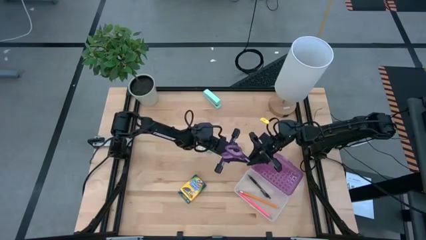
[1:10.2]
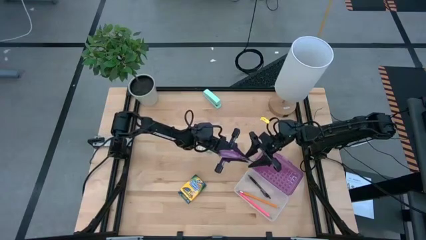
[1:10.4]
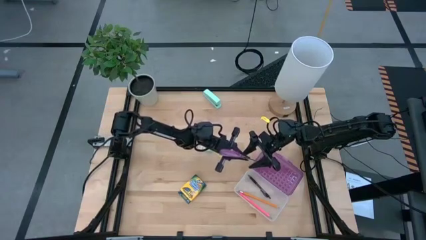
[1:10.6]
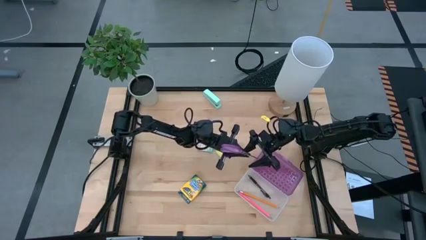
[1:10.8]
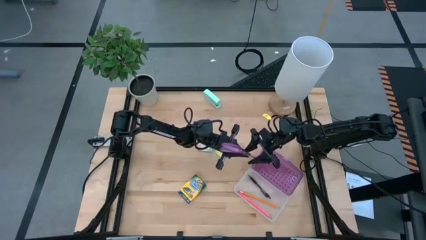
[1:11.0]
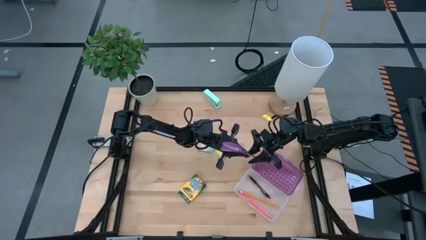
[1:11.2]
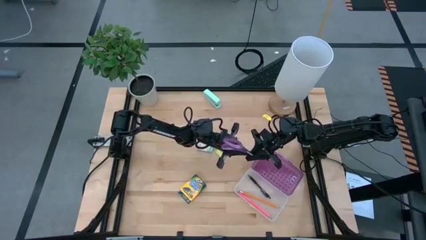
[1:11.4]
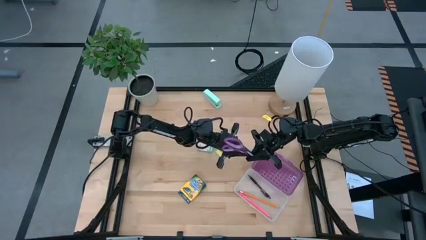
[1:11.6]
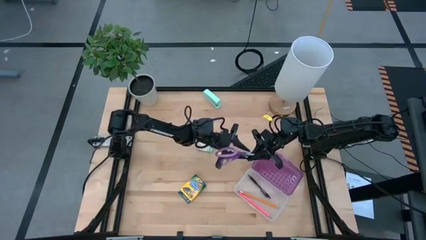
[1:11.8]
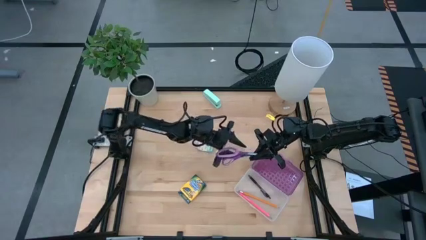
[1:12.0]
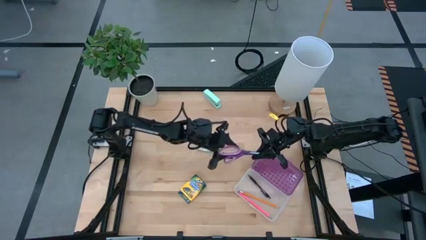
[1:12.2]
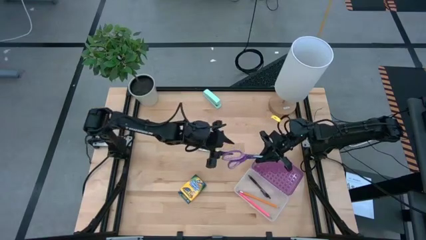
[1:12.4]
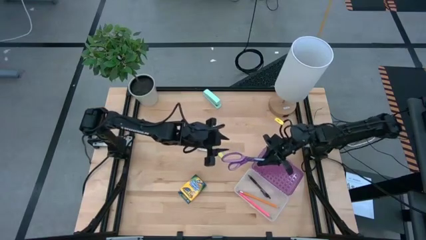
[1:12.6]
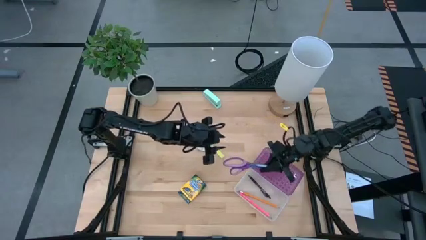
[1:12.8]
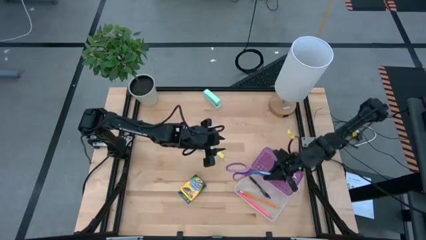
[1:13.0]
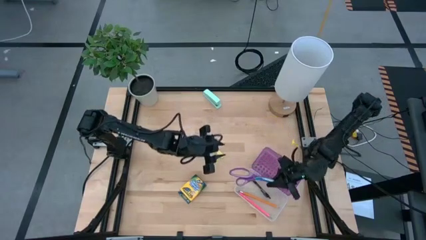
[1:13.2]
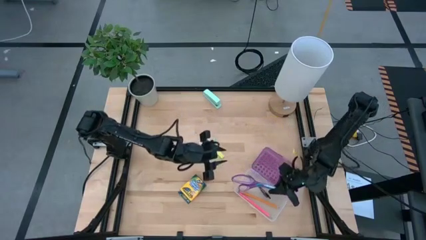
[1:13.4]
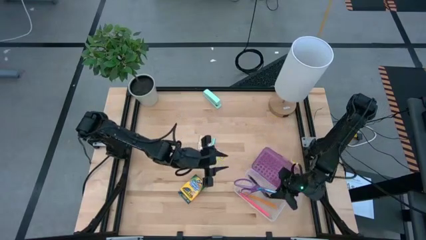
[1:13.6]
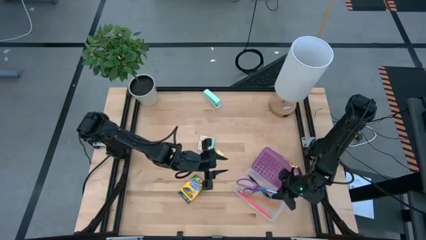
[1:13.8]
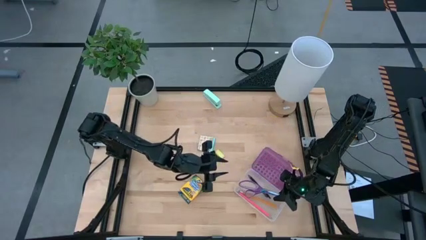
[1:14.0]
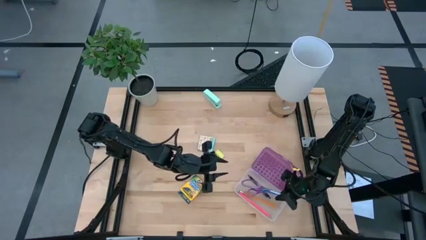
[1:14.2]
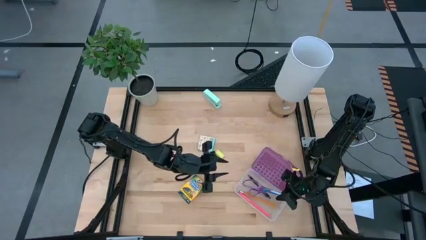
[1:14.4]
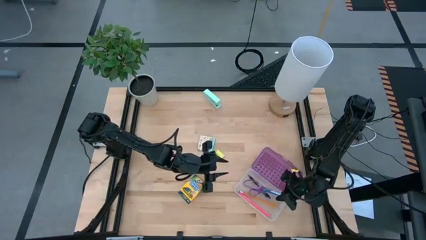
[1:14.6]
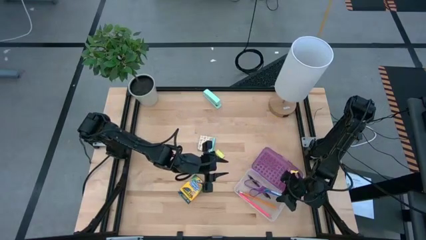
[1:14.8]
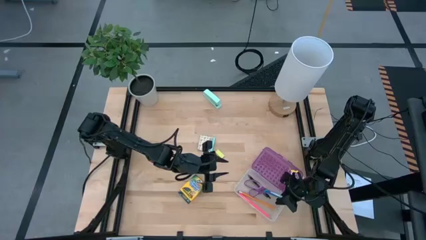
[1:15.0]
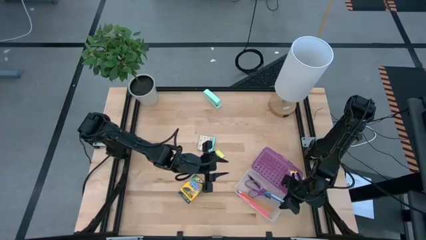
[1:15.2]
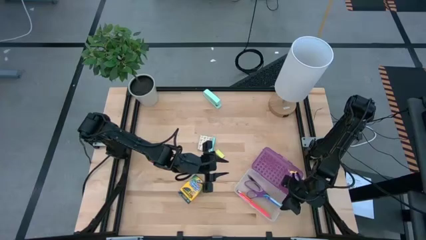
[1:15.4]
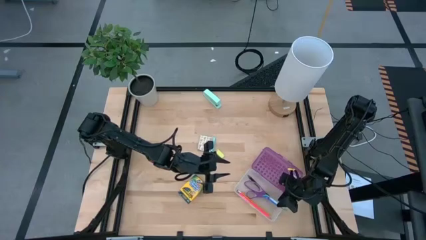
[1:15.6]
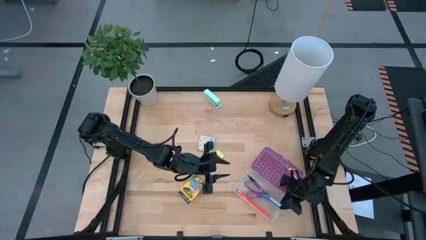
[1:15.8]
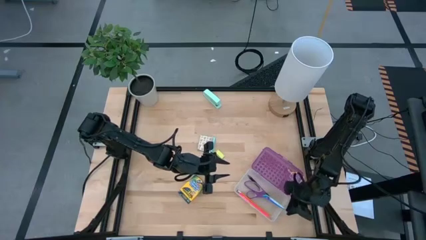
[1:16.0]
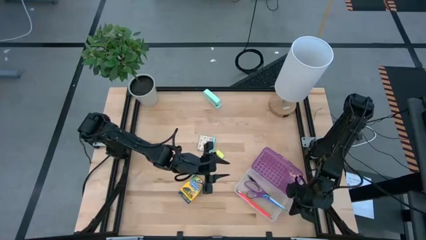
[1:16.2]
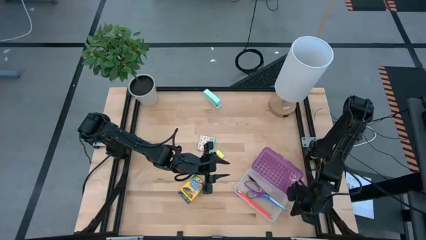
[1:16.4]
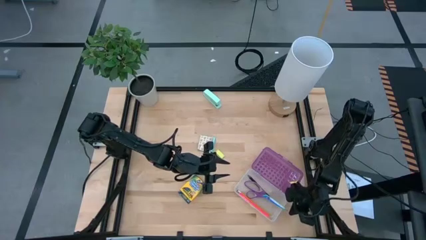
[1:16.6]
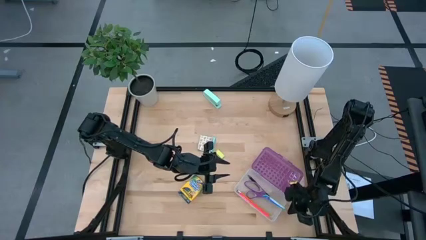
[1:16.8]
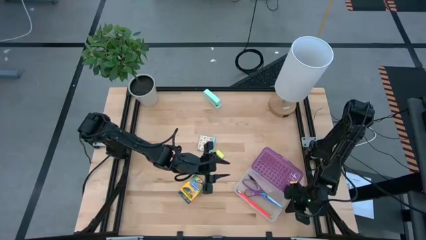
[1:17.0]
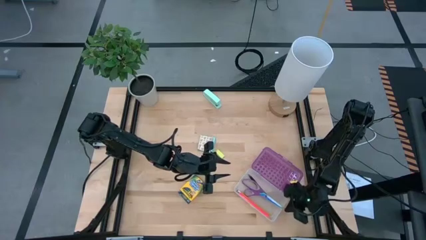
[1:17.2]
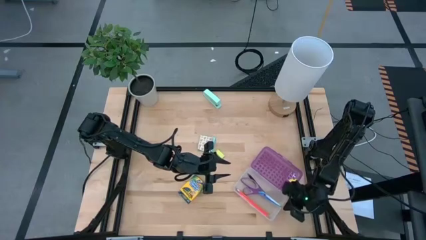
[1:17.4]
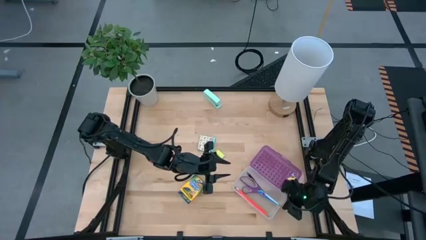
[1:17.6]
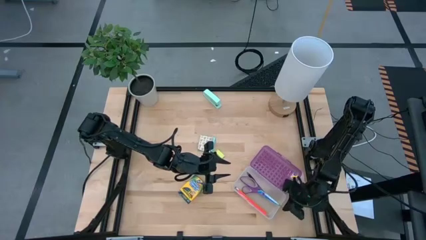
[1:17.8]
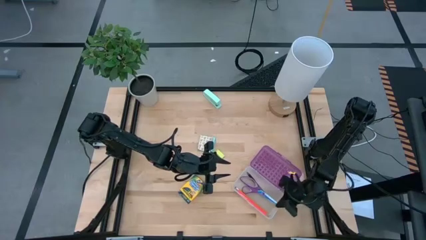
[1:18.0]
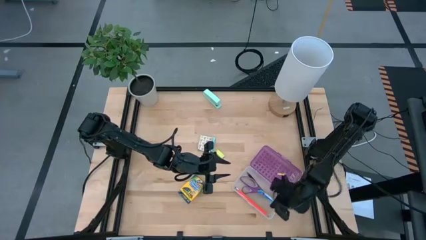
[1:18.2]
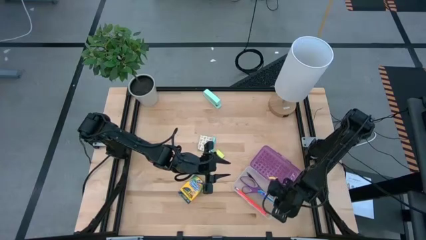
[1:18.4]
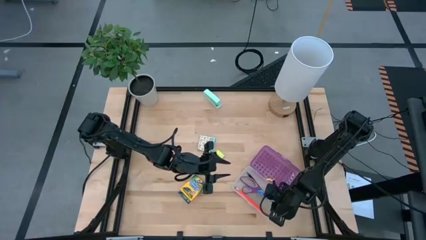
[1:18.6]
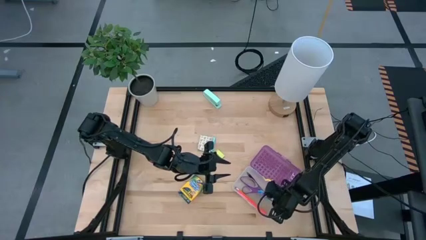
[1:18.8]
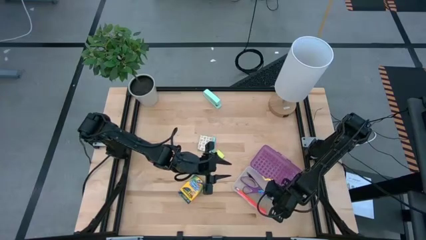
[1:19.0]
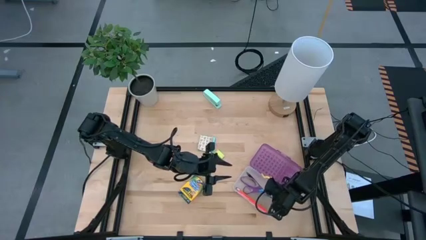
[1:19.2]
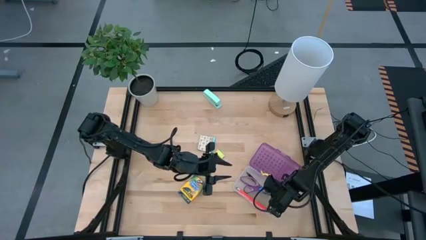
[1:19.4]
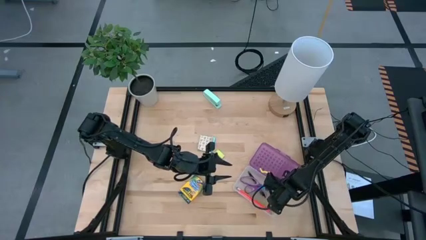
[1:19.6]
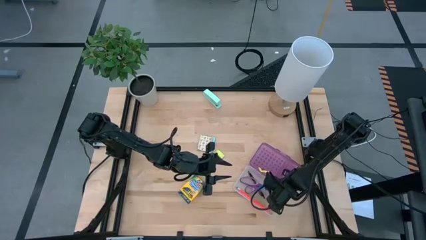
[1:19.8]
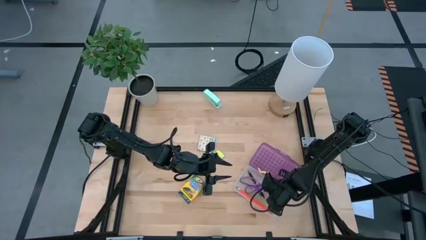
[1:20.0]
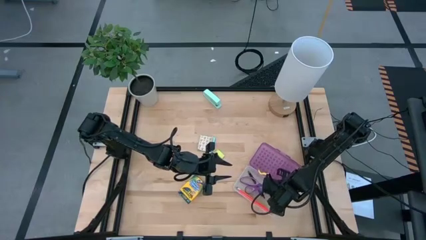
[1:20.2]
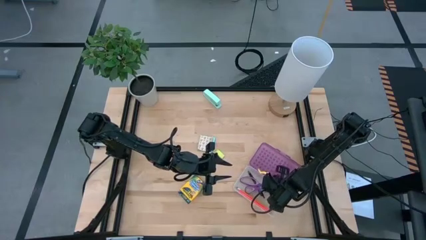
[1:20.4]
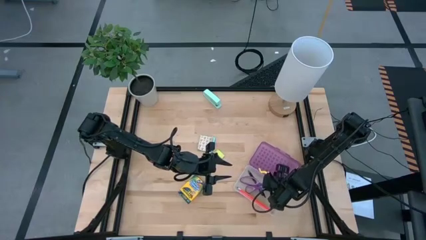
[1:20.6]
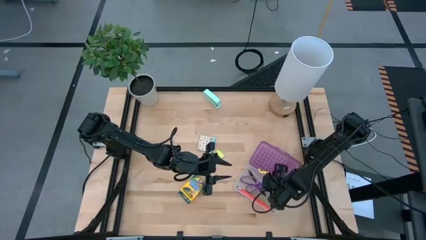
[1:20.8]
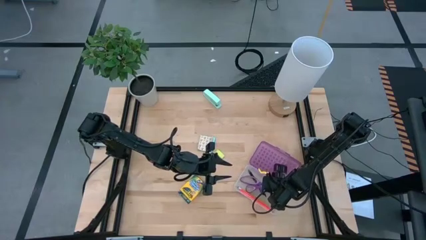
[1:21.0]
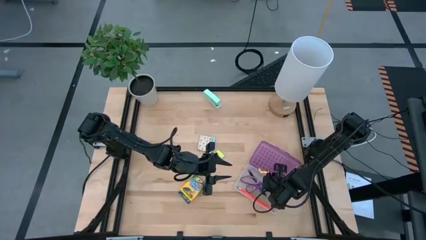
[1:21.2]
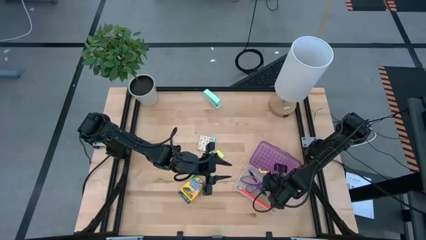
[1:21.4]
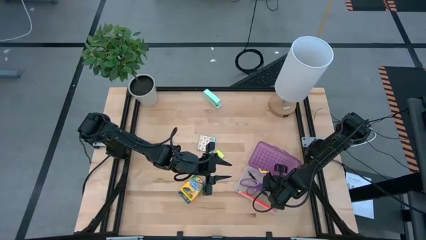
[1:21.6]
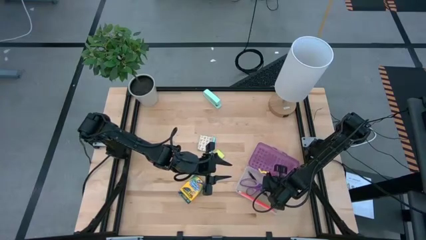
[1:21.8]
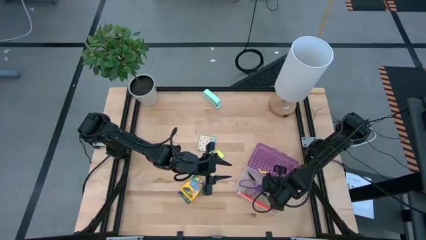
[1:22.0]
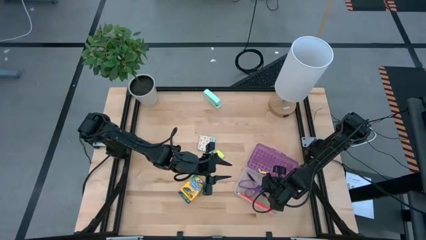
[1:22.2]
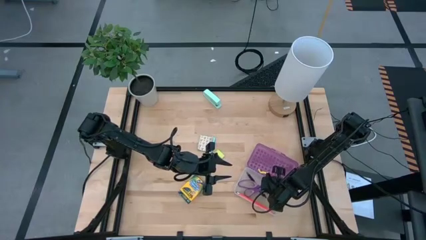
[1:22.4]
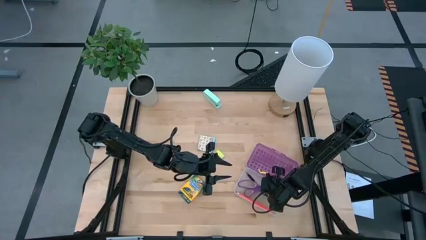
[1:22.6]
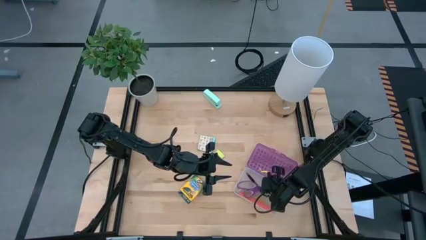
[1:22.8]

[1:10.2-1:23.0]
Task: Pack school essentials
Put the violet scissors into the violet supply box
